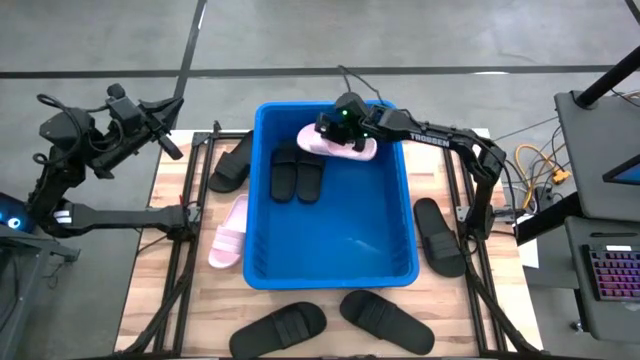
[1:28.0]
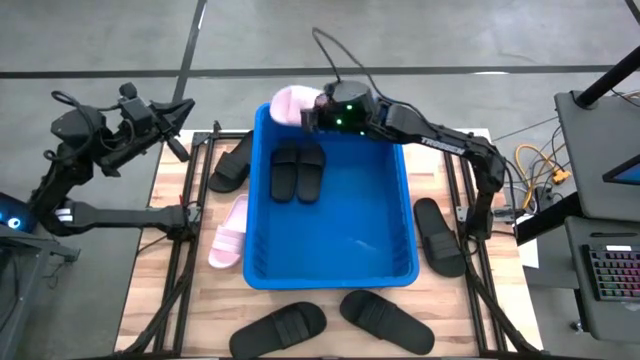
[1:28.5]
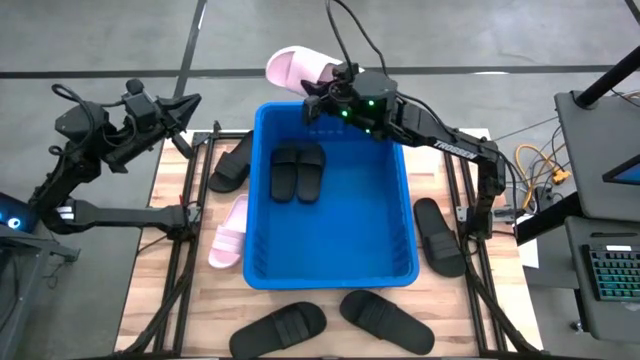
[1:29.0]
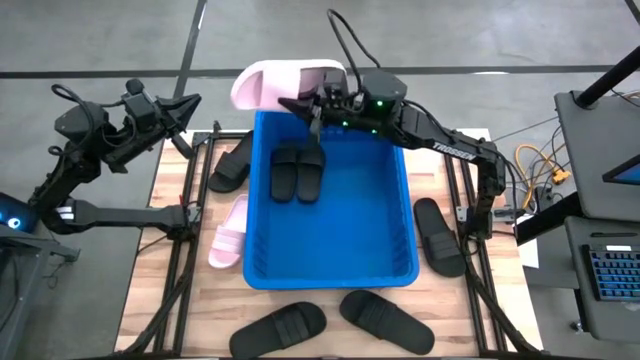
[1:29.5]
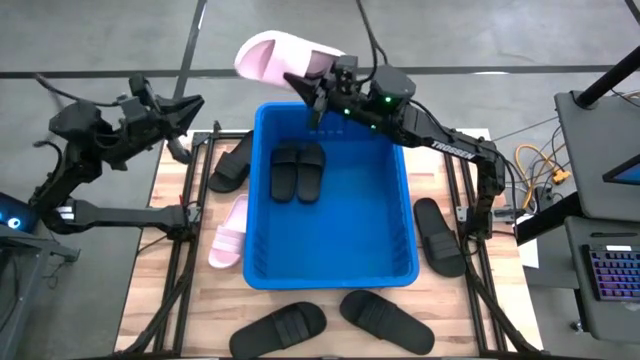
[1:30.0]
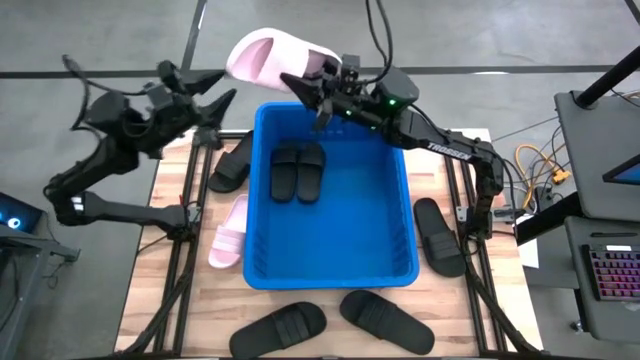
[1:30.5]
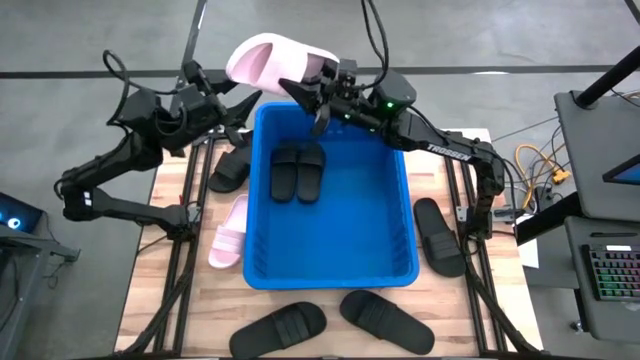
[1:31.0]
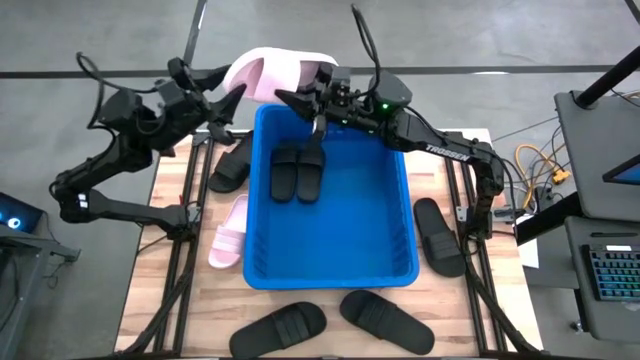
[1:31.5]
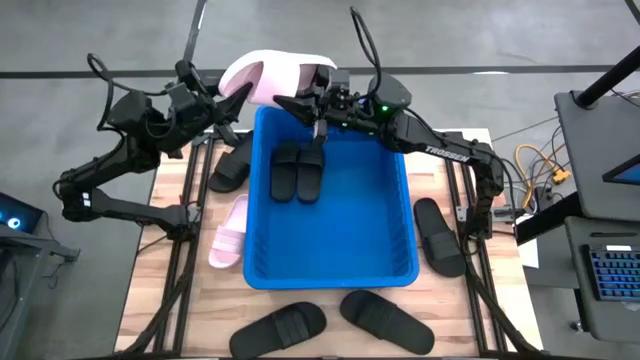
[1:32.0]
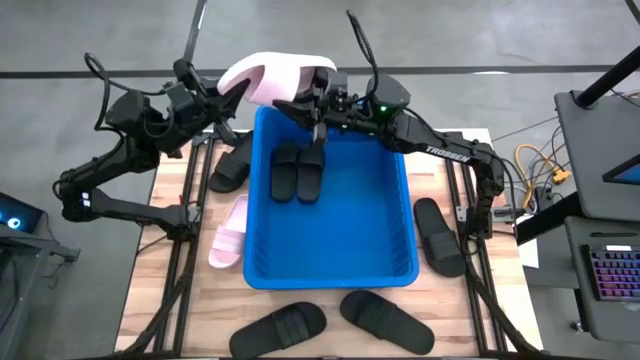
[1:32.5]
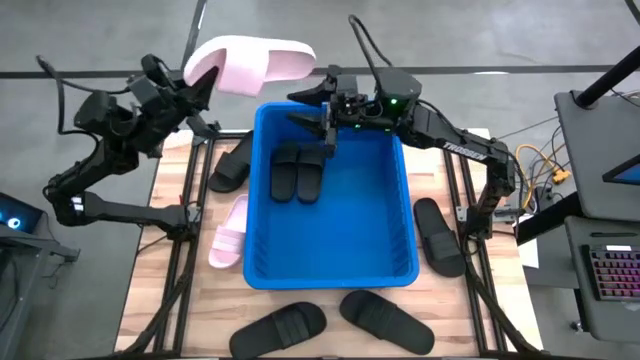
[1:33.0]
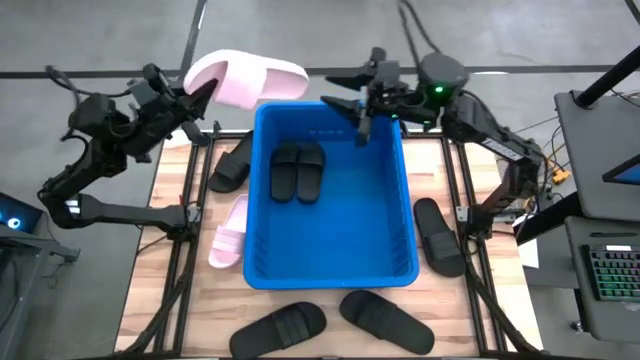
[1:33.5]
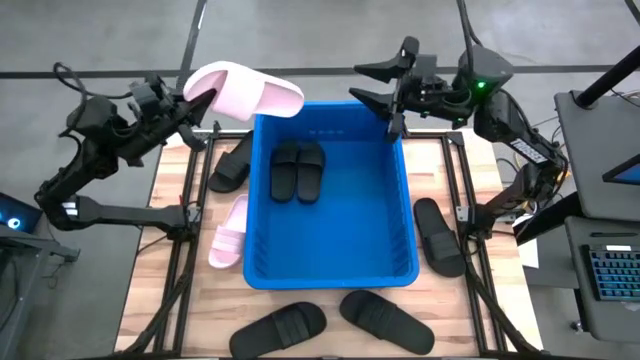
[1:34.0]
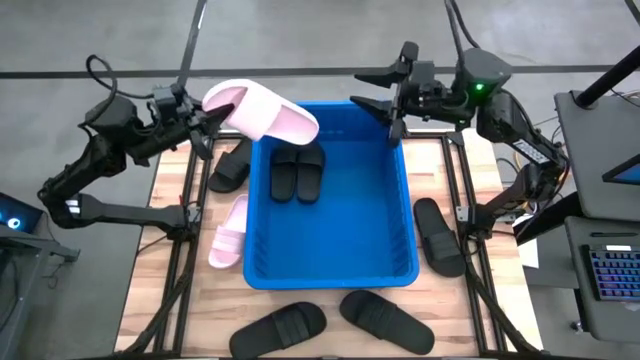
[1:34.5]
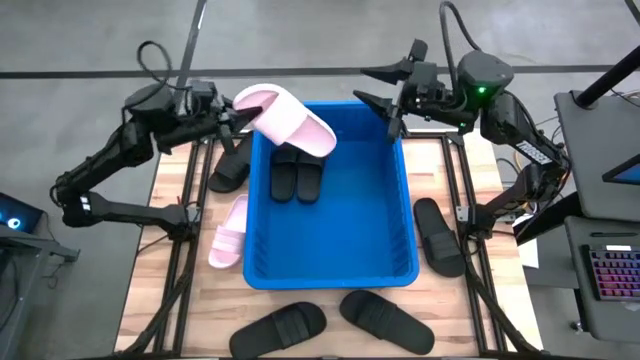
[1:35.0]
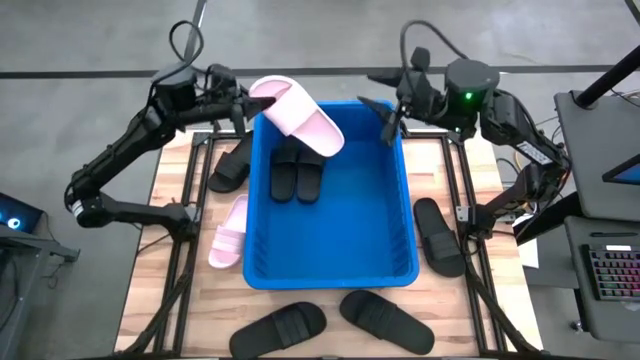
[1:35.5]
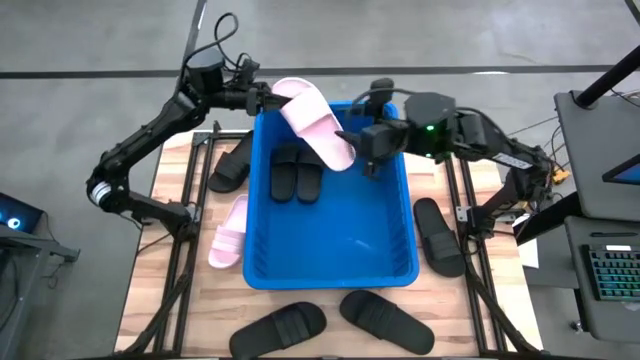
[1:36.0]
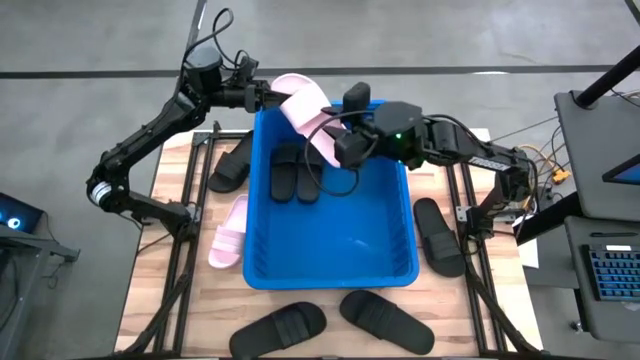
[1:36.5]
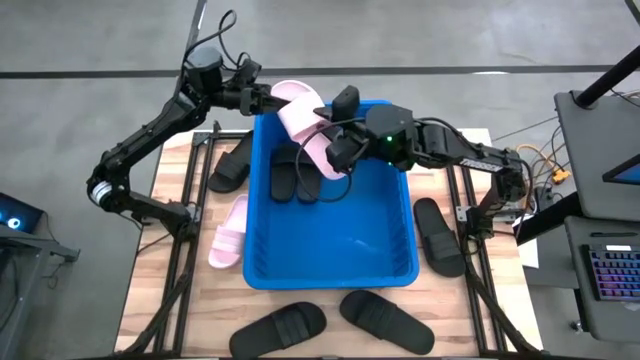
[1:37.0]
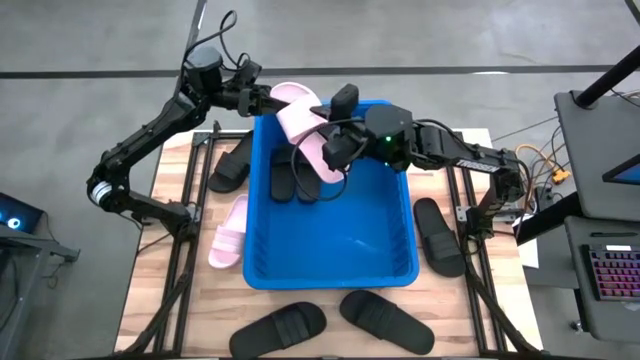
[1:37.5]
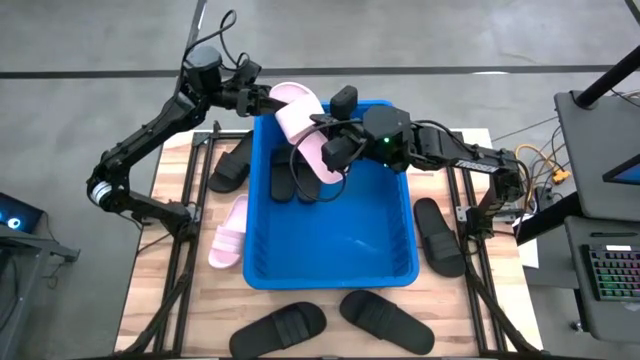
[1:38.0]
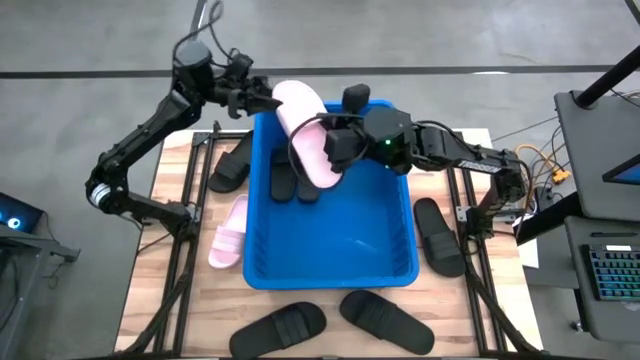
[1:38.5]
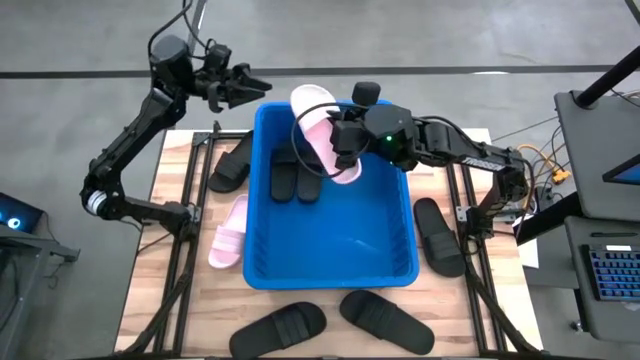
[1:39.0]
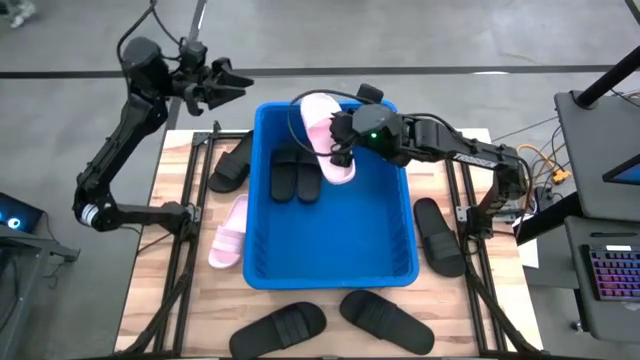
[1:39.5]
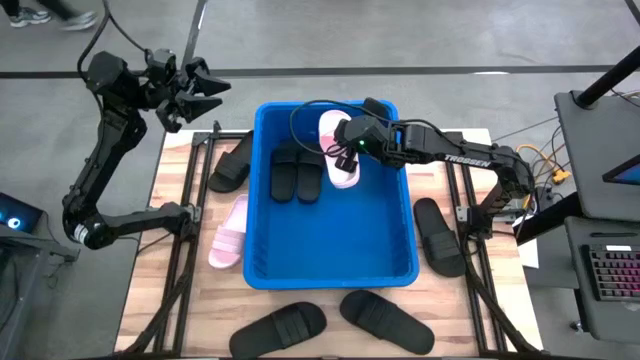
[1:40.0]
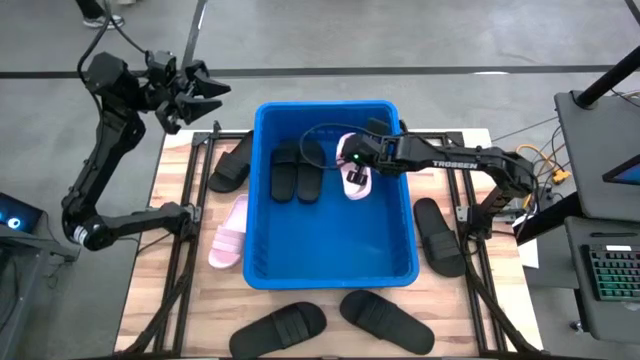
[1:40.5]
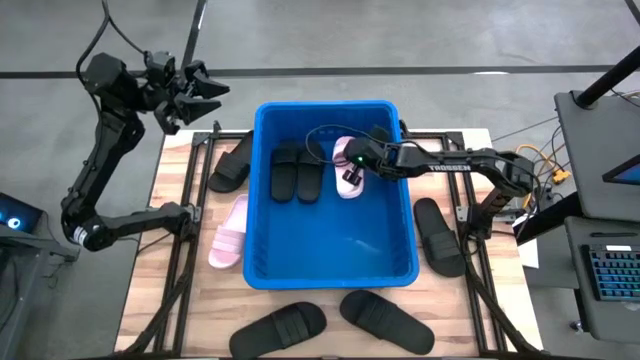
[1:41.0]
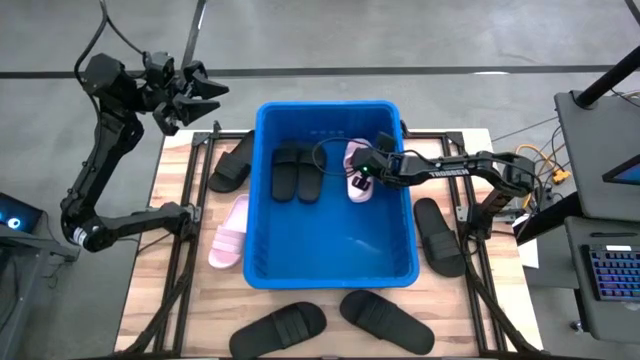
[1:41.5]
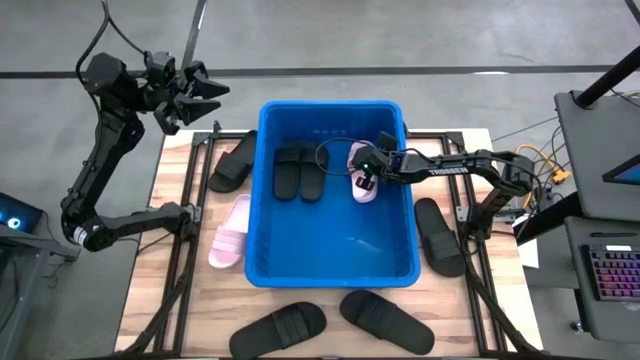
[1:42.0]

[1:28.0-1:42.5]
Task: Pick and place slides into bin
Put the pink slide into the blue bin

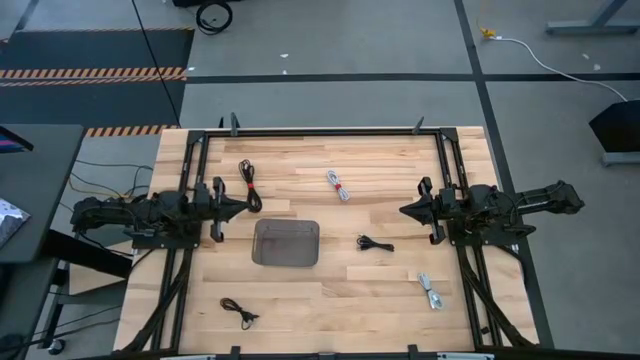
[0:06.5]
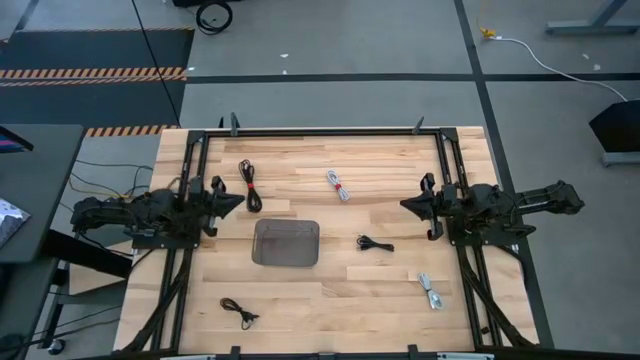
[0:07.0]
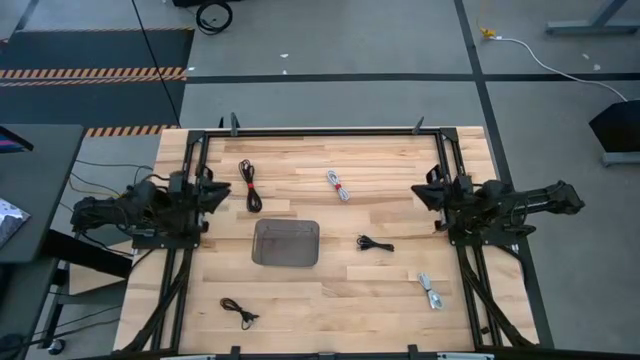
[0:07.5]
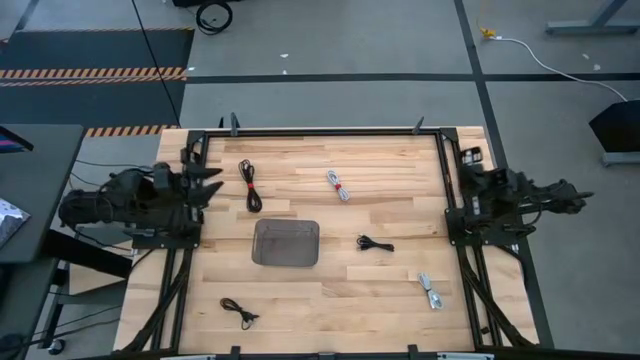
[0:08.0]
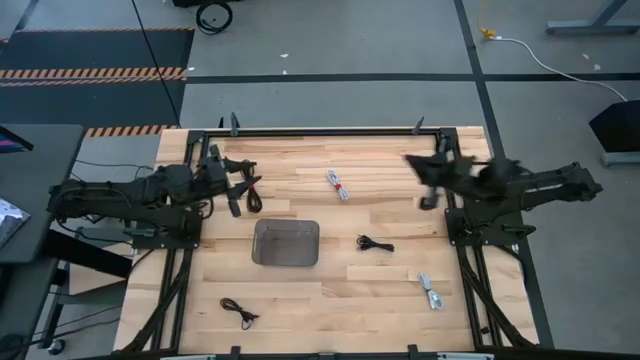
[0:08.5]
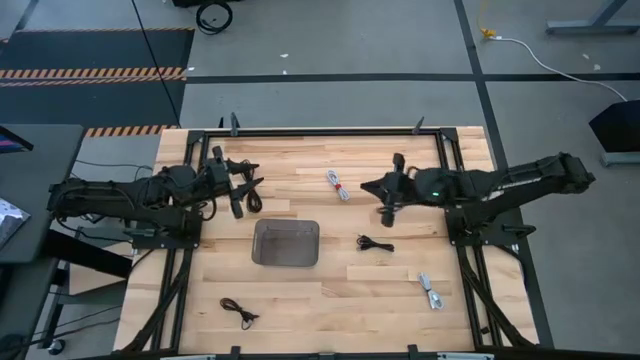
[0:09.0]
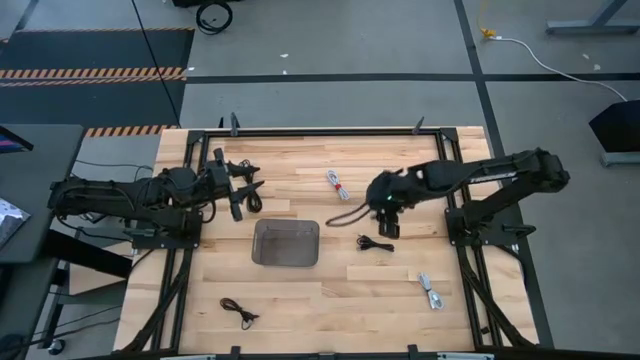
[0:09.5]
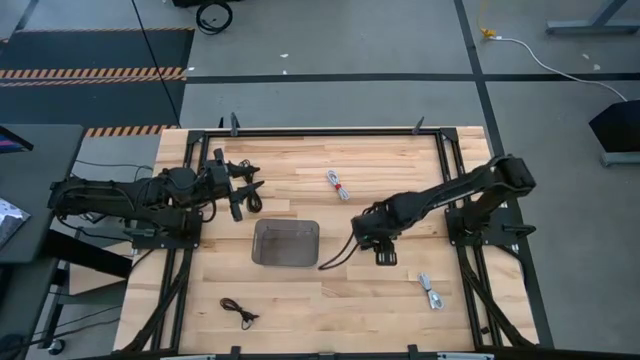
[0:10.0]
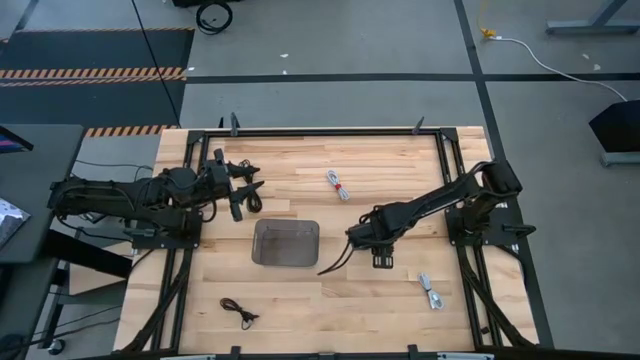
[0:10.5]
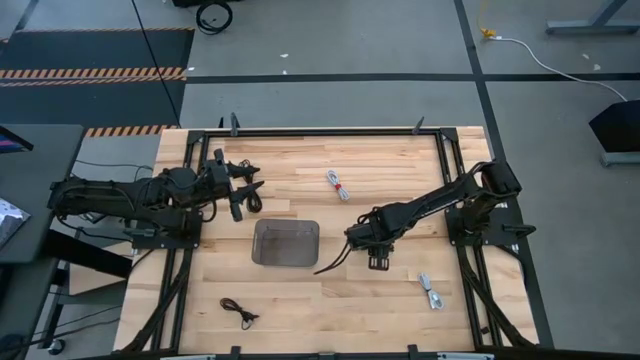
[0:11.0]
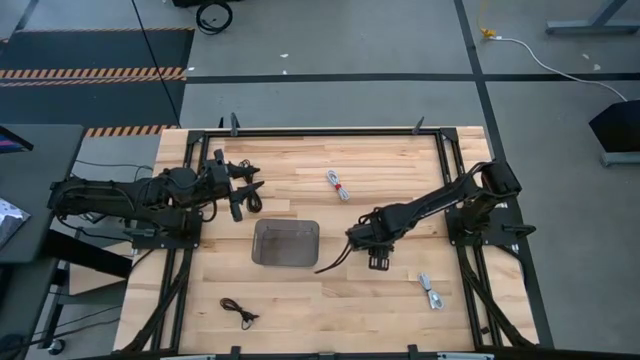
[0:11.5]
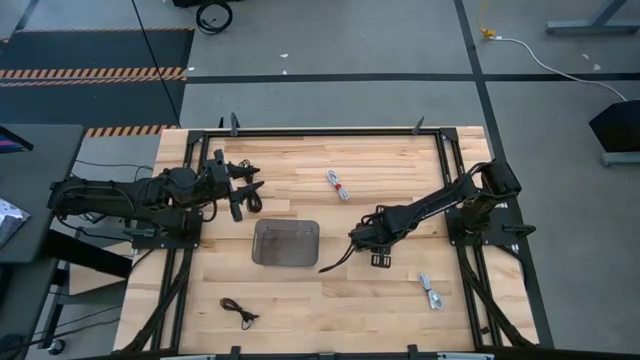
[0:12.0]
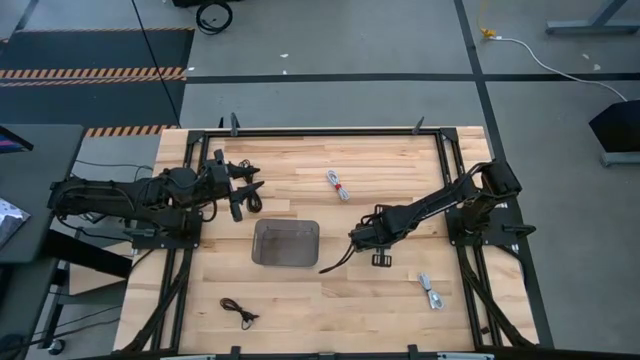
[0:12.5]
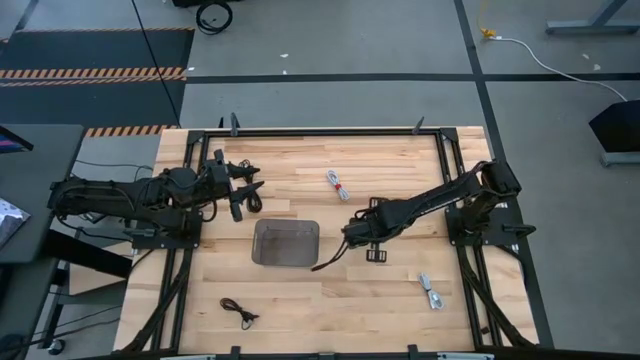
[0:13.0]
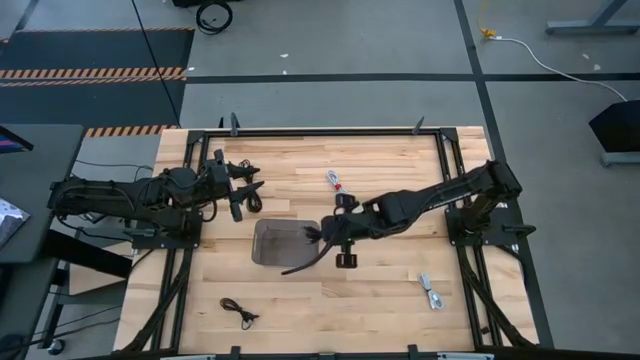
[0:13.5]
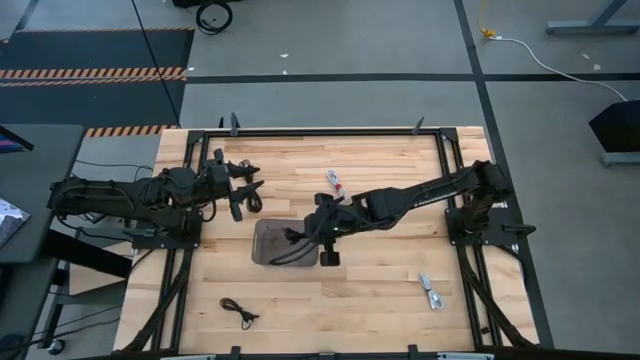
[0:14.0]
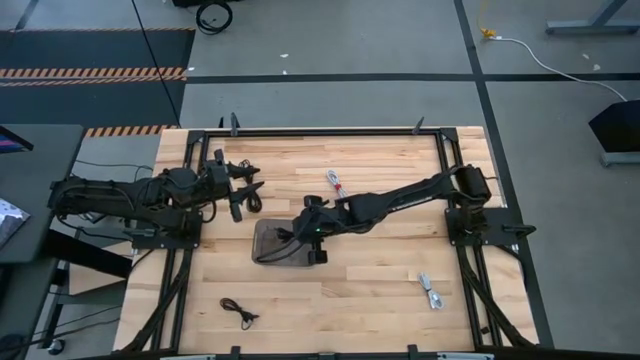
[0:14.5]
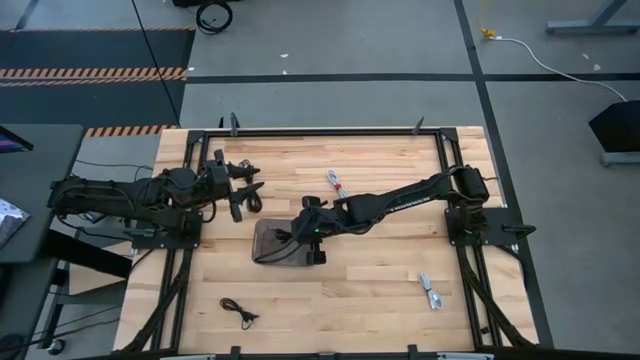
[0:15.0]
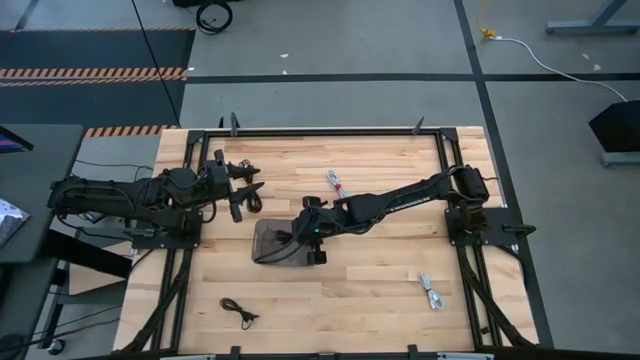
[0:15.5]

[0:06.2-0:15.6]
Task: Pick and place USB-C Cables
Put the middle black USB cable into the black bin
